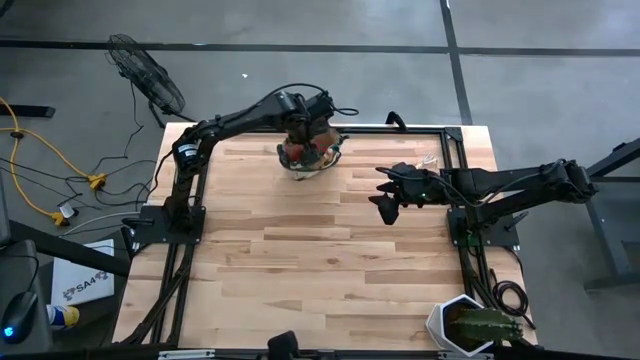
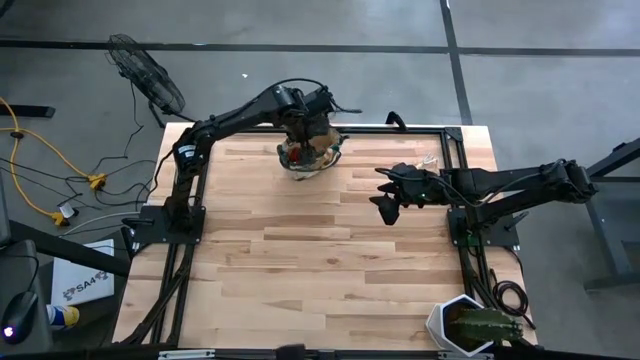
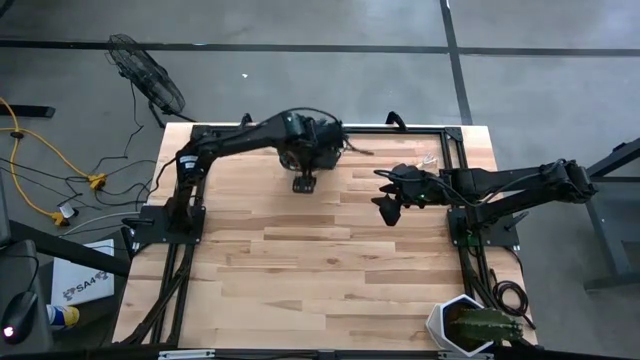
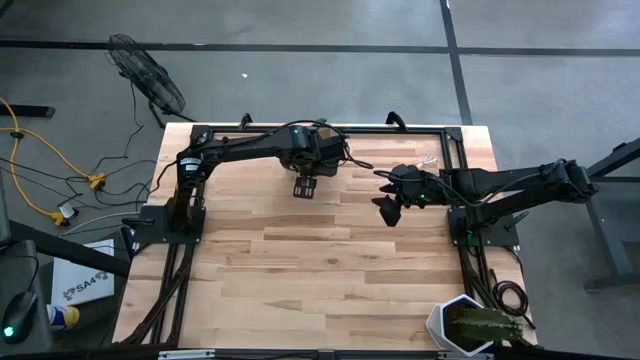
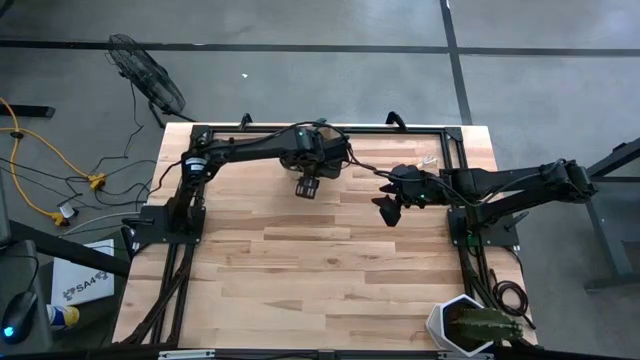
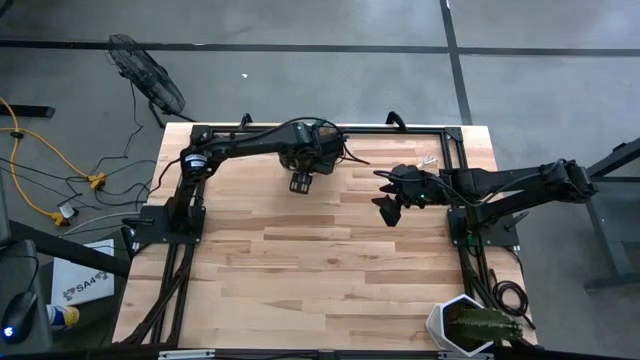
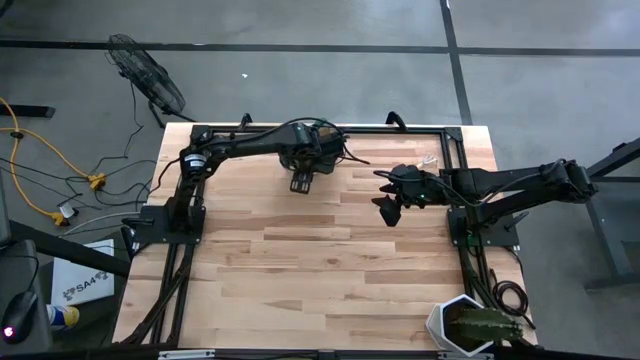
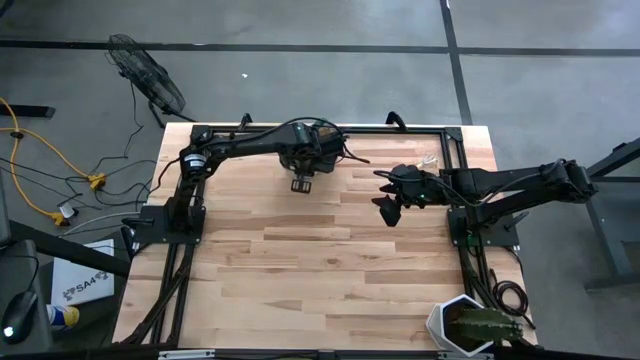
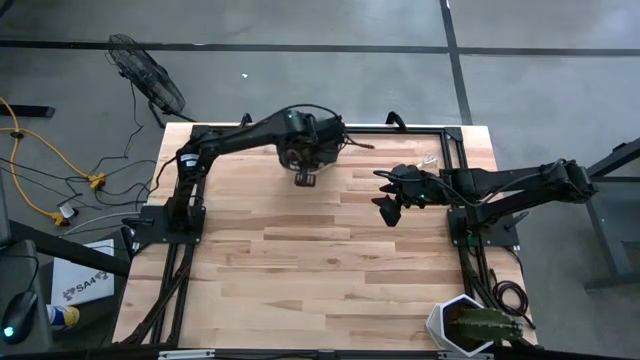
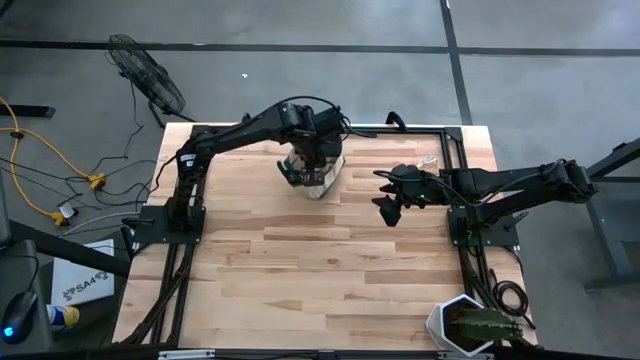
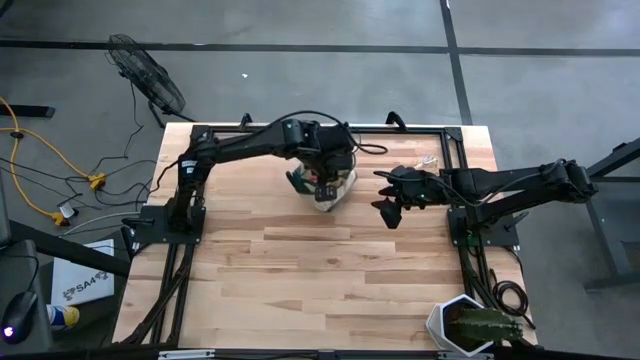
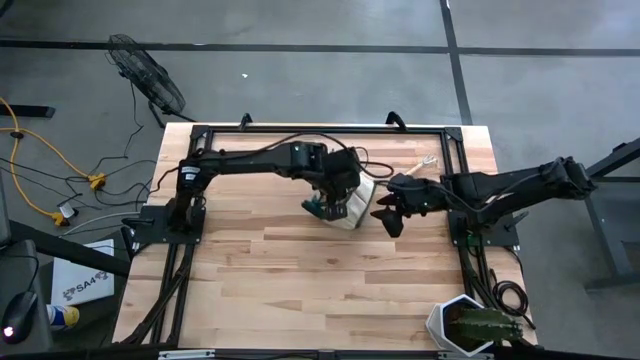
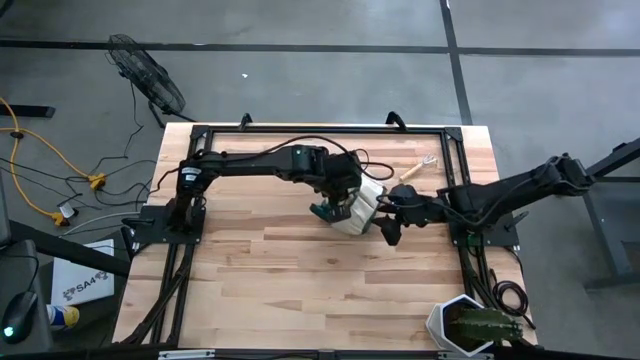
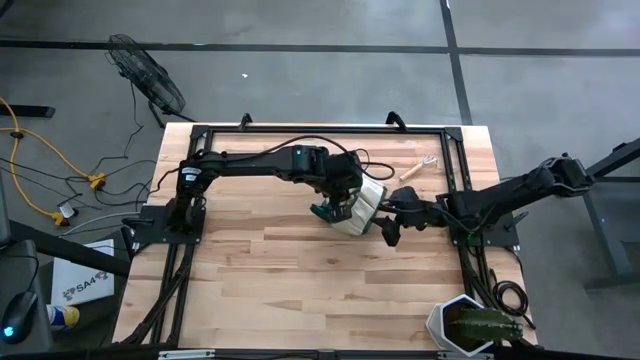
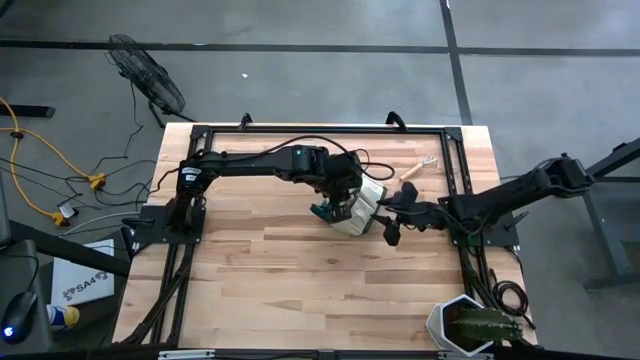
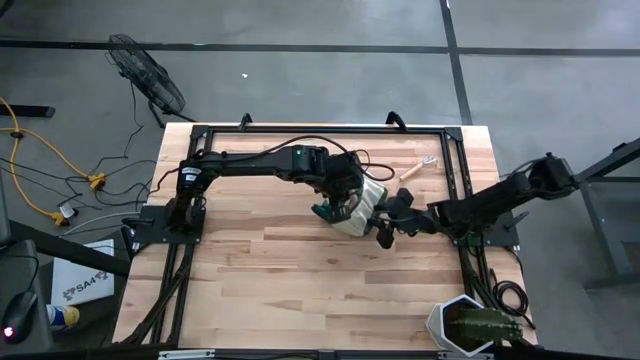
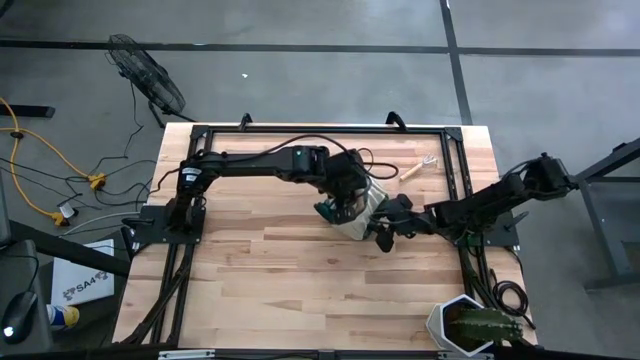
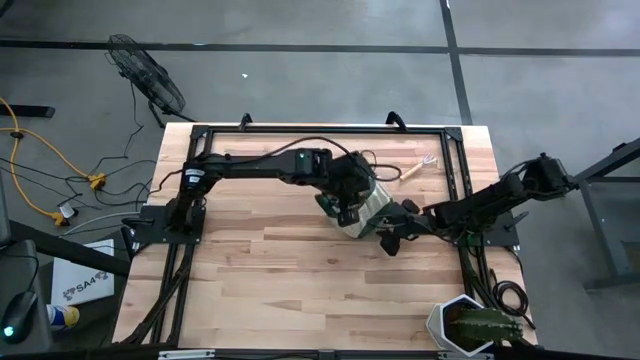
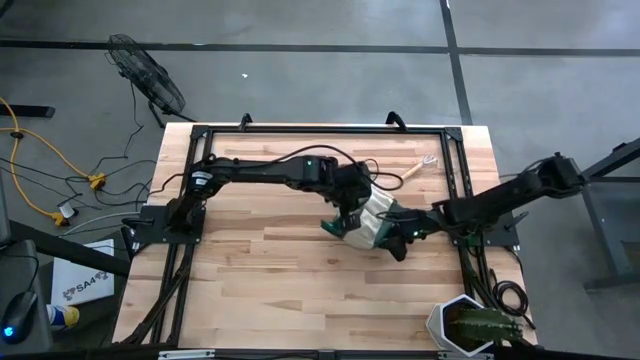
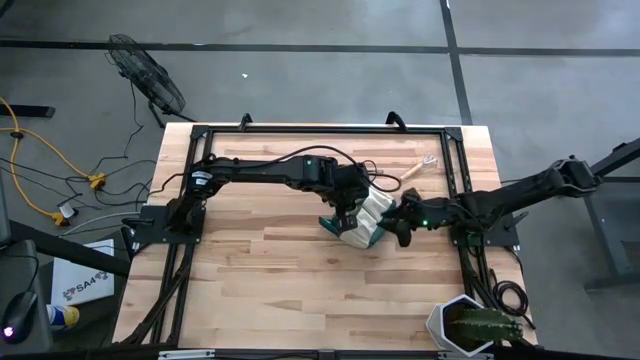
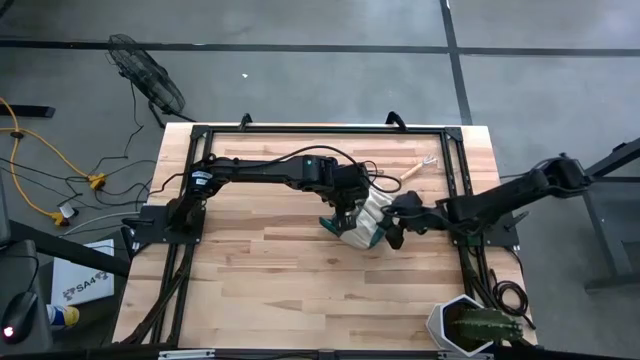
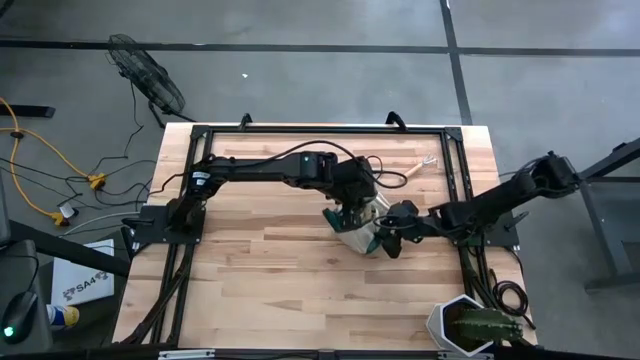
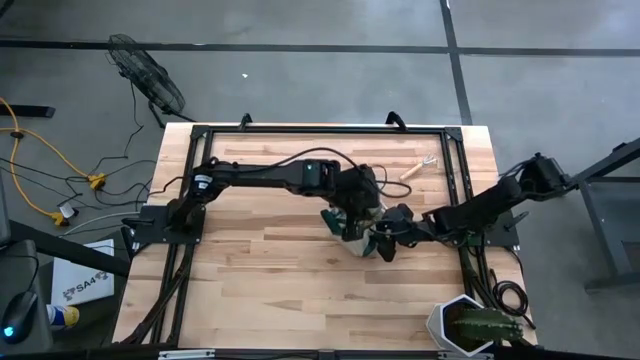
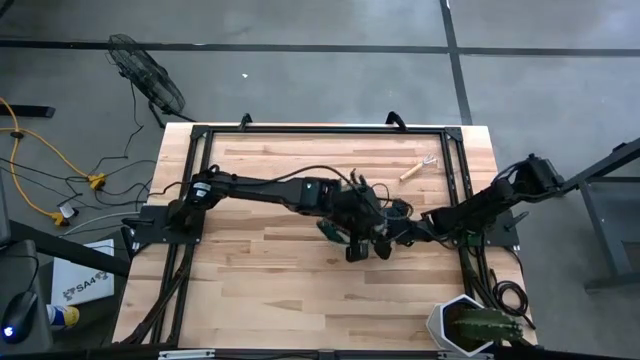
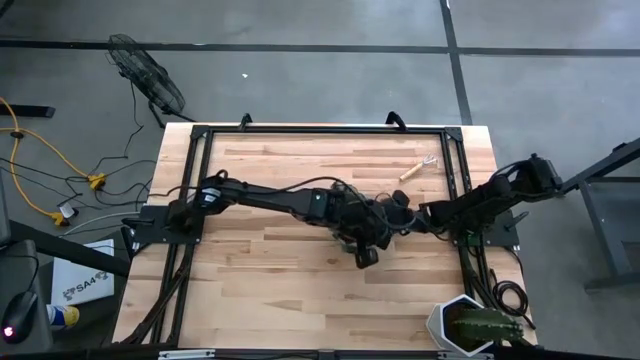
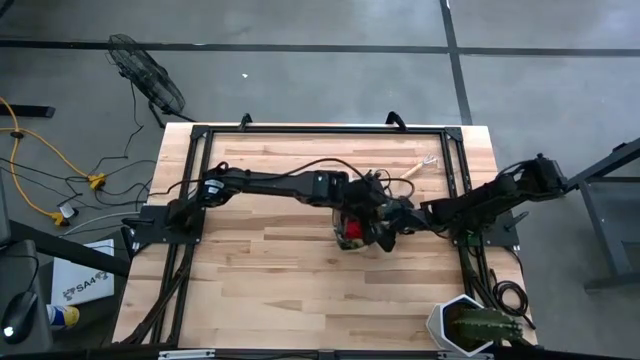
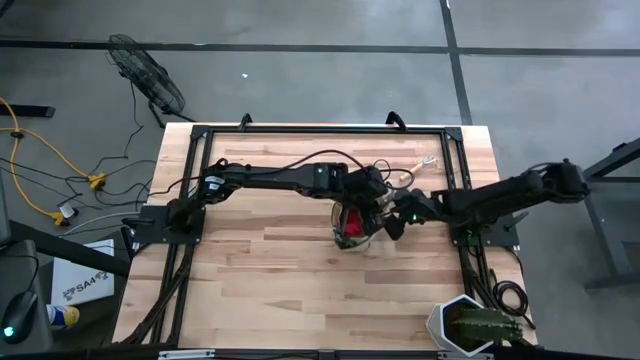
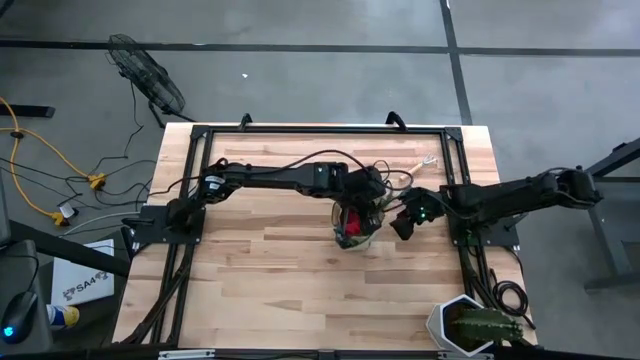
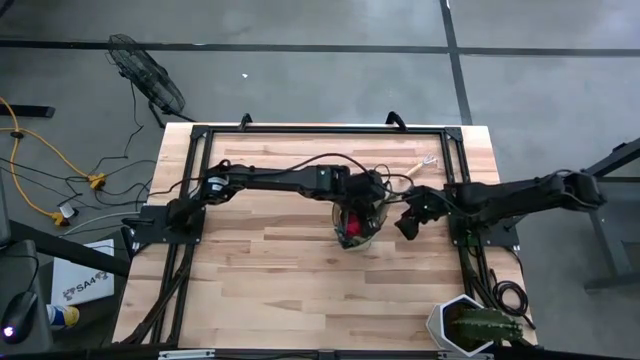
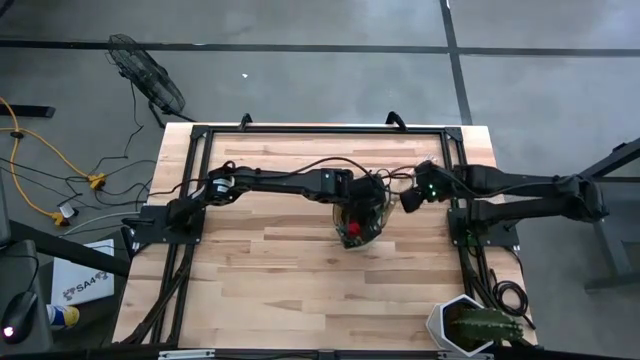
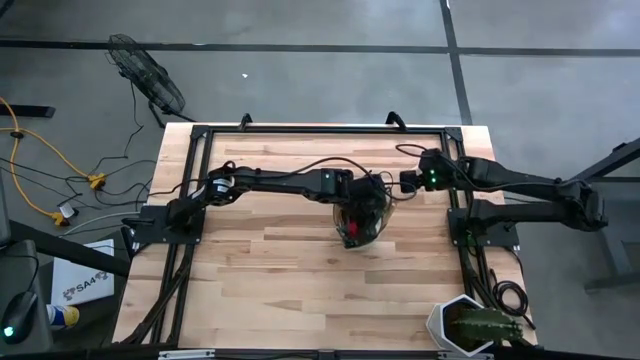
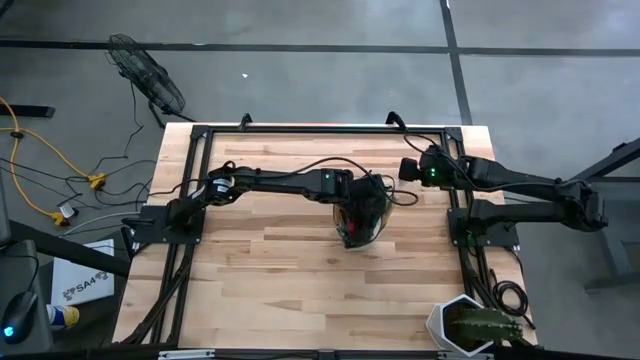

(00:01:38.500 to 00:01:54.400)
Task: Pick & Place Garden tools in Gardening bag
Adjust the white gardening bag on the table

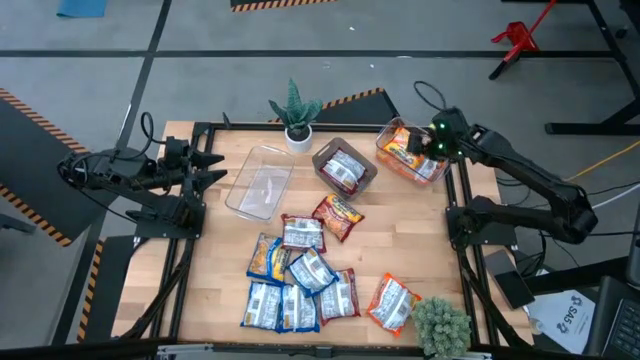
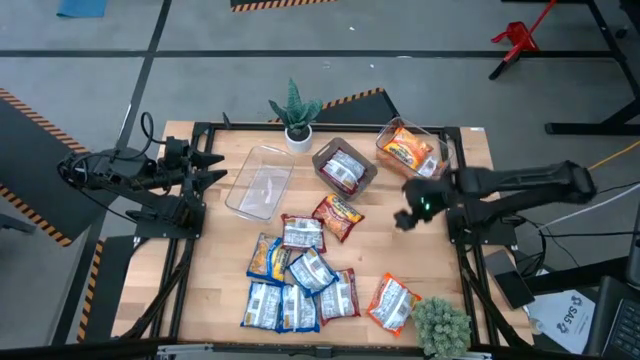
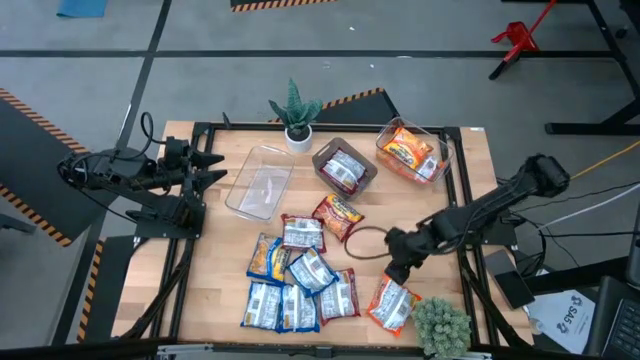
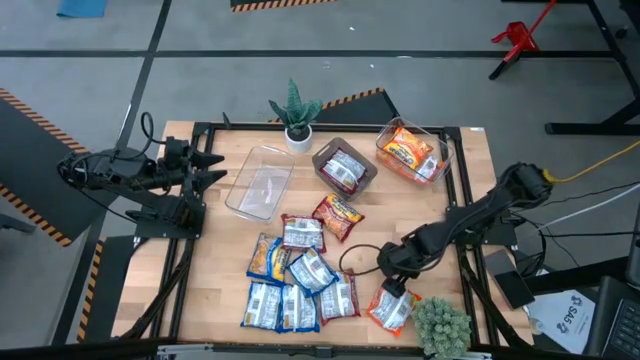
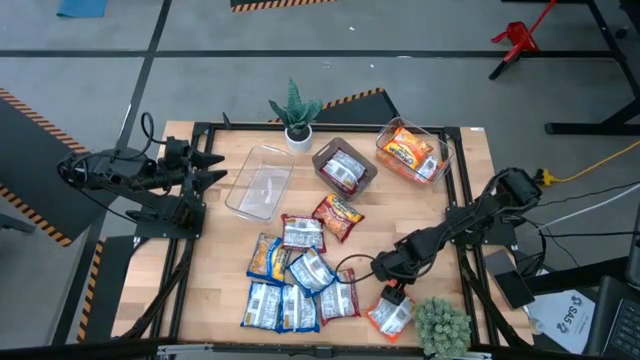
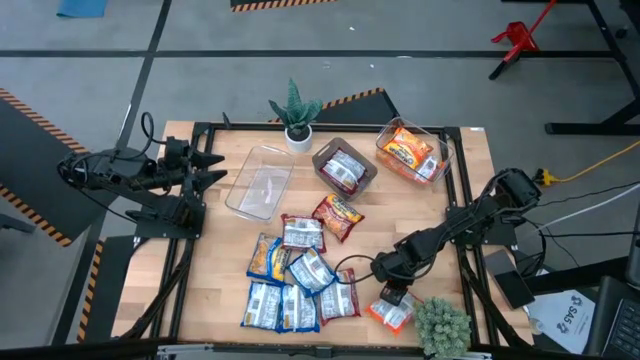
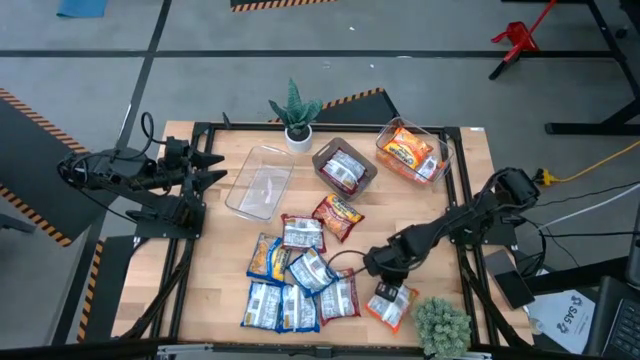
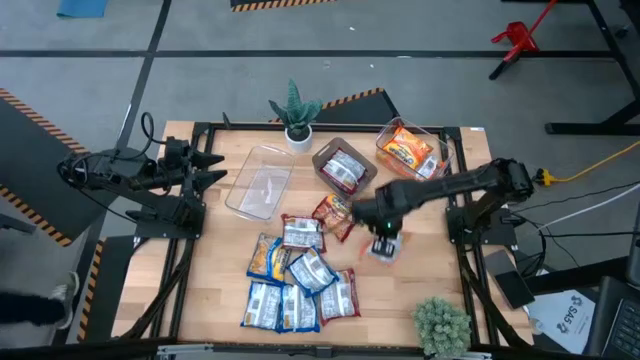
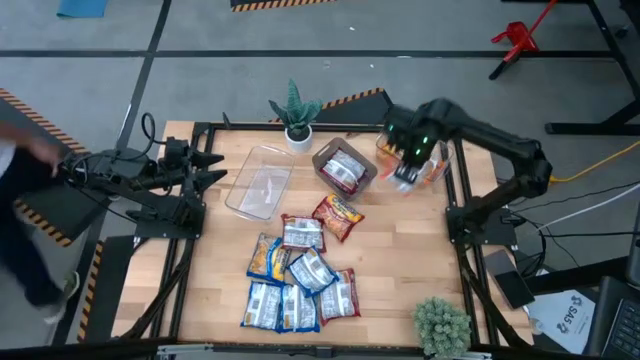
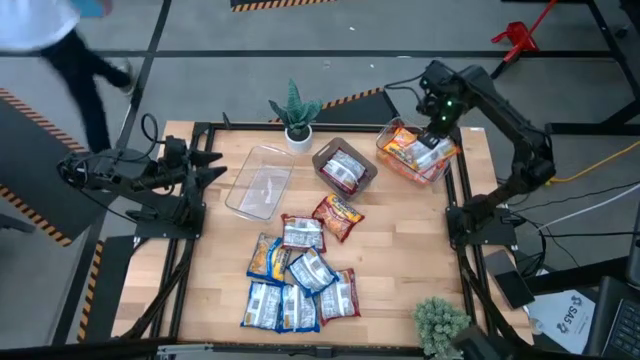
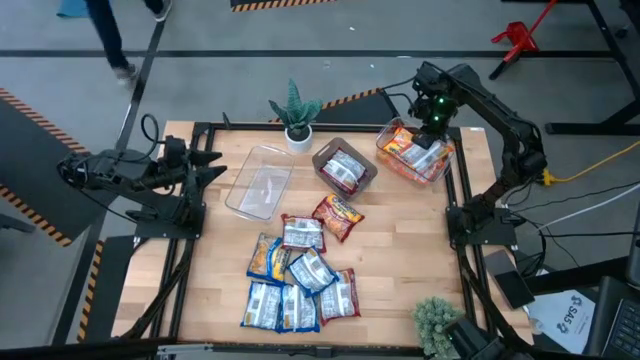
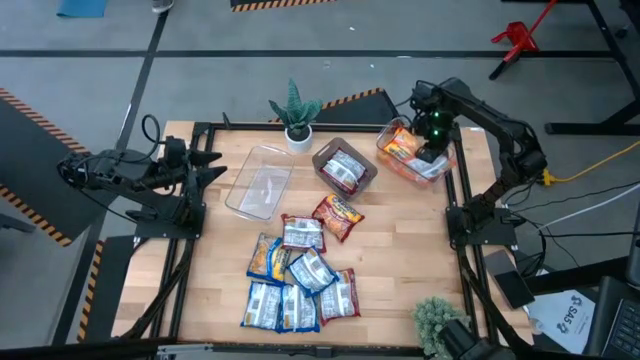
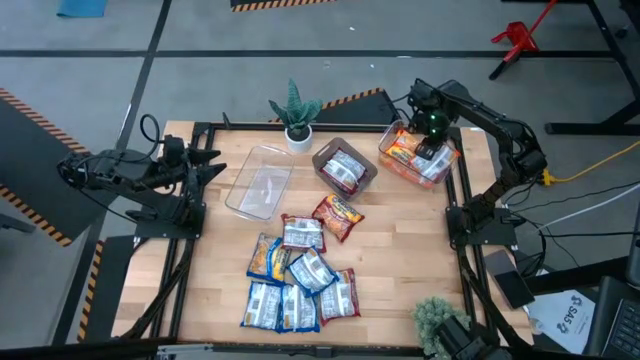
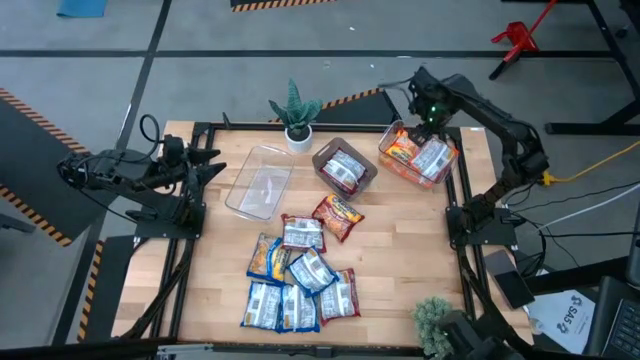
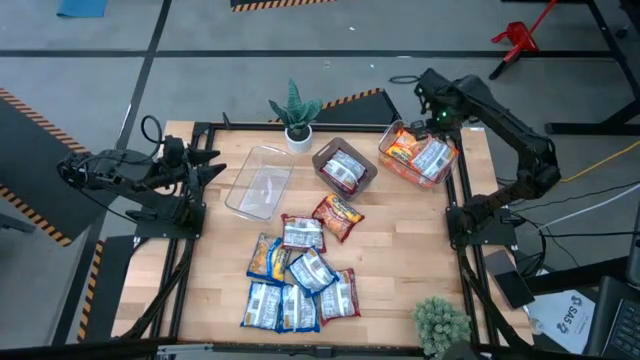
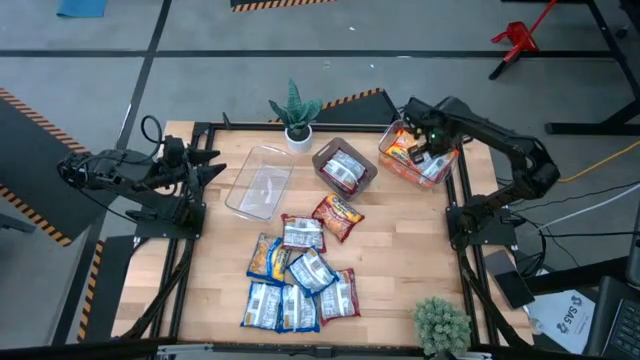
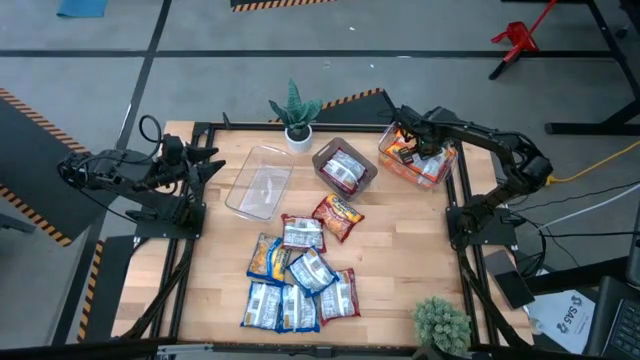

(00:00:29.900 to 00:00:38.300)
Task: Sort Maruchan noodles
Put the orange noodle pack into the right transparent bin
